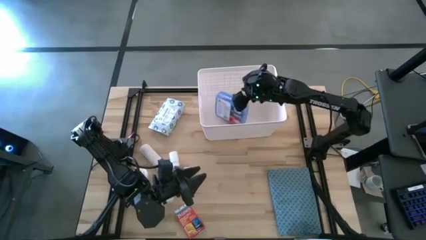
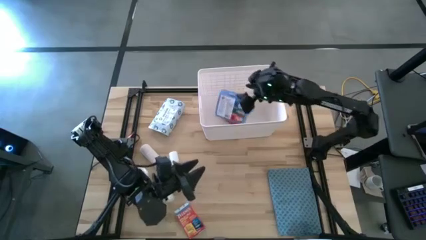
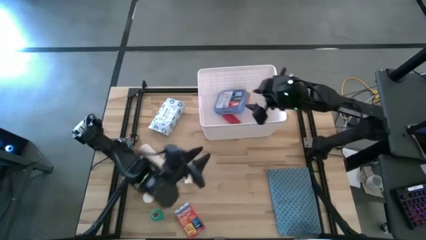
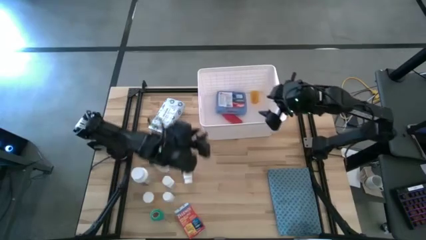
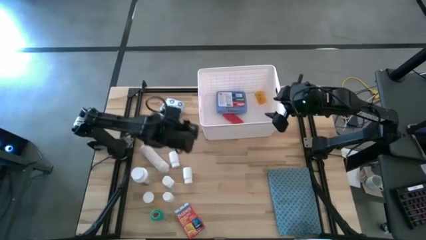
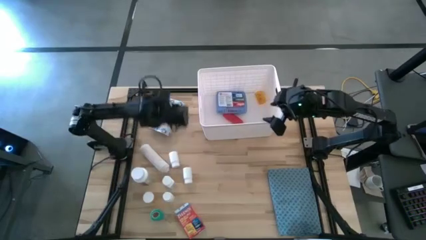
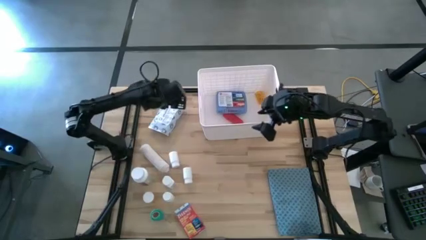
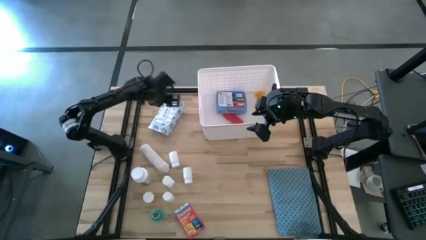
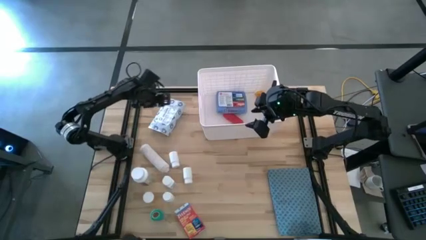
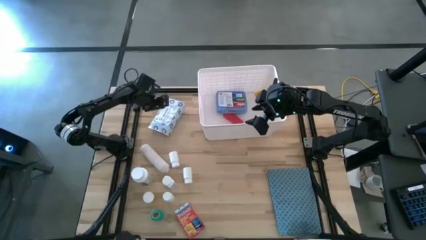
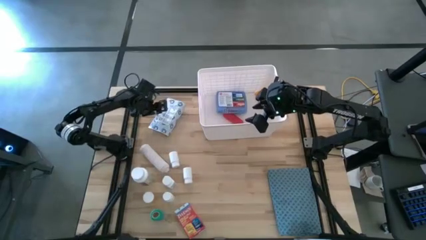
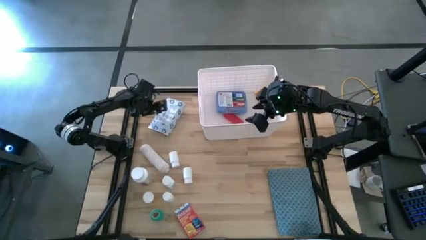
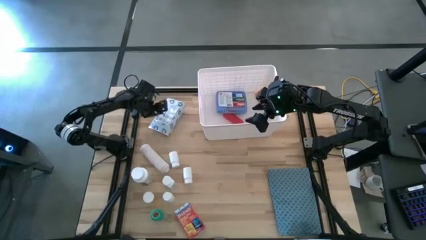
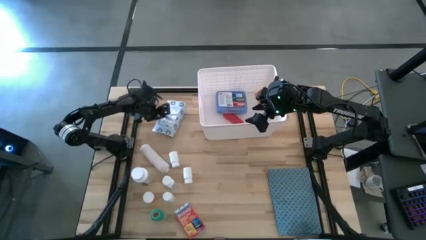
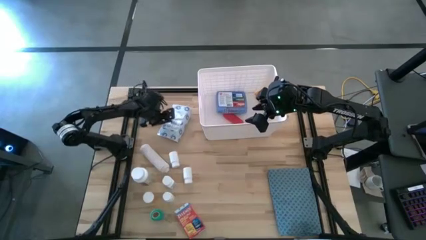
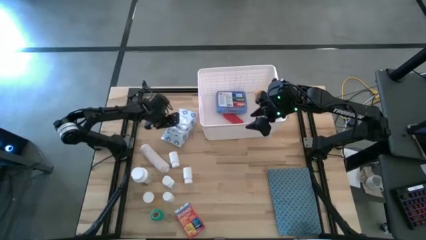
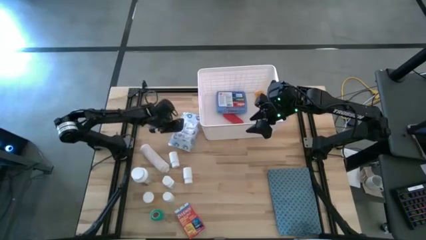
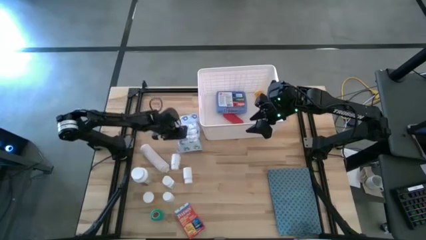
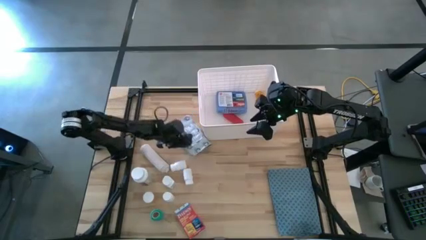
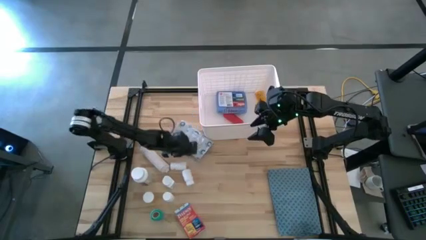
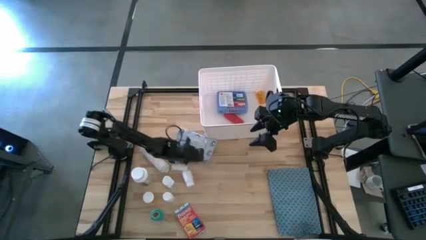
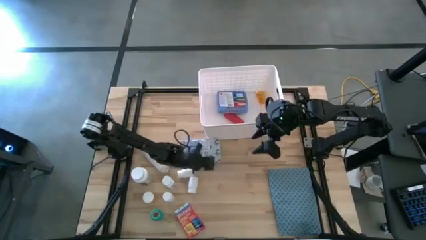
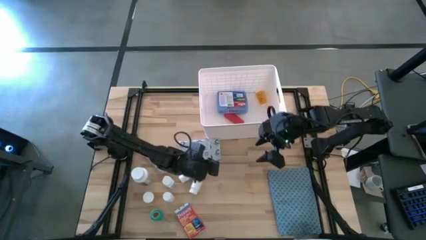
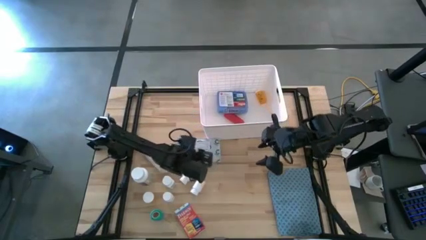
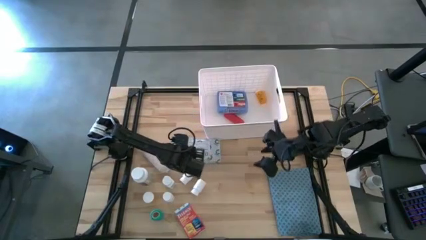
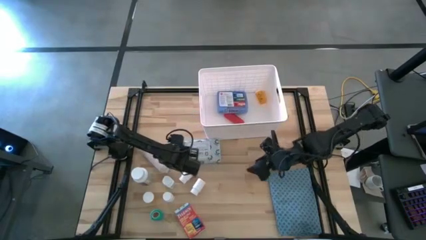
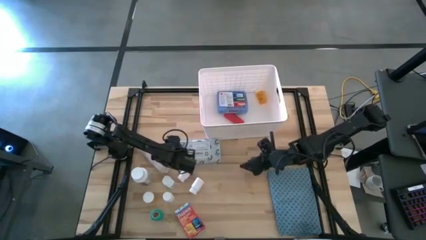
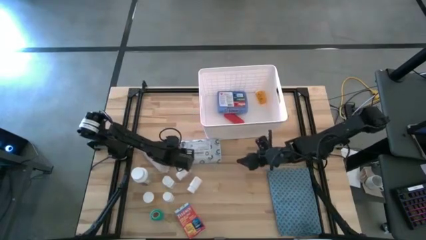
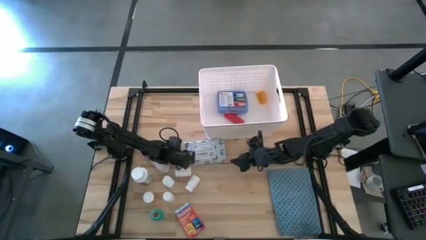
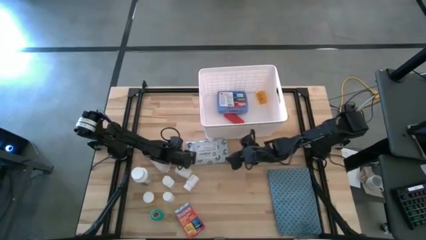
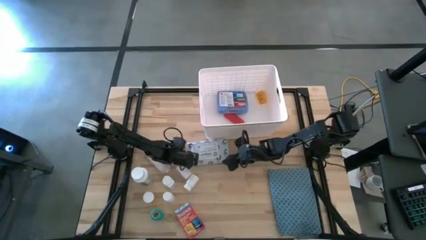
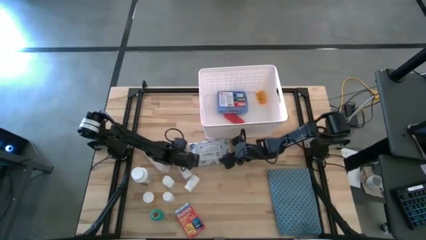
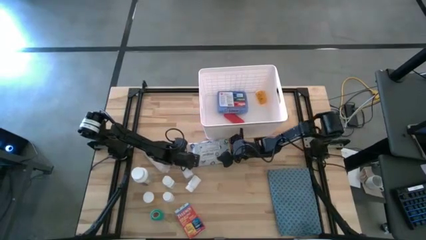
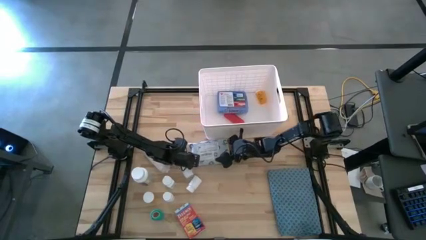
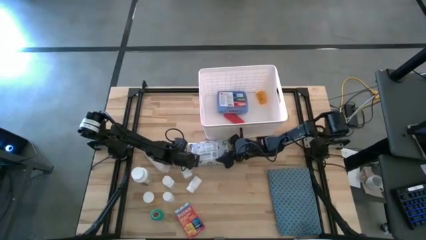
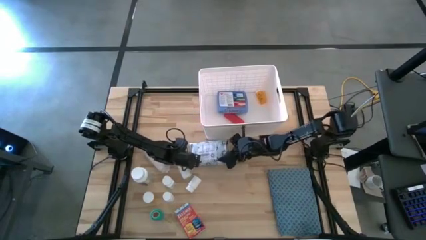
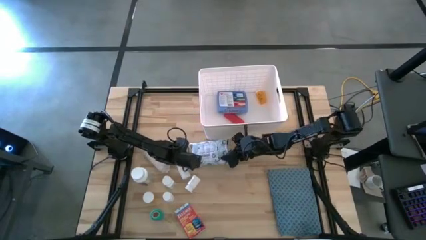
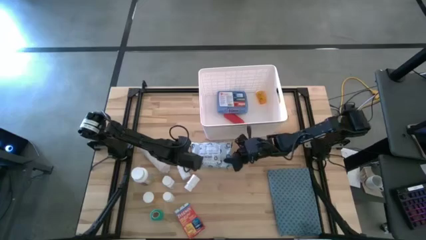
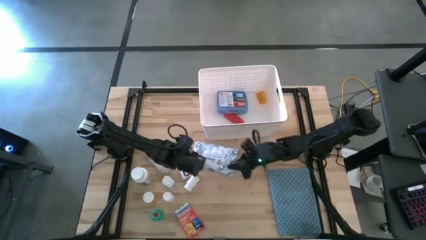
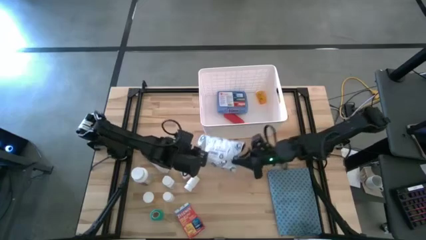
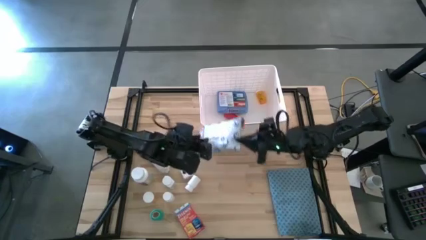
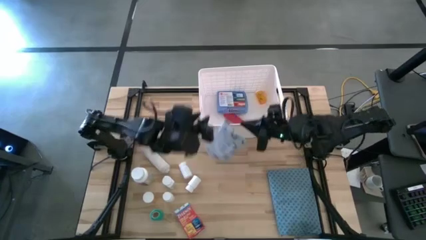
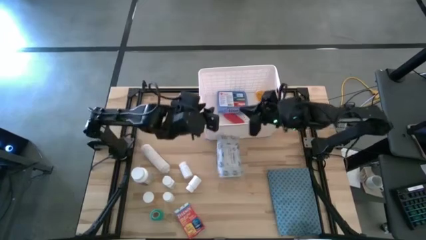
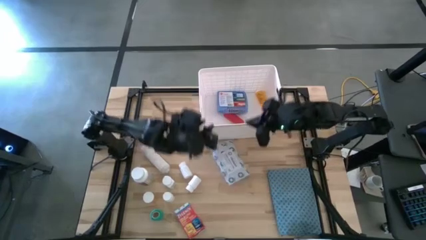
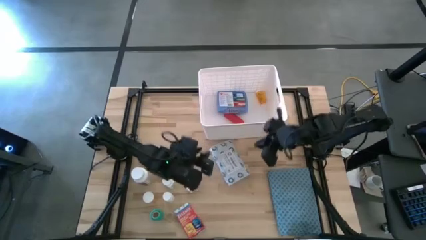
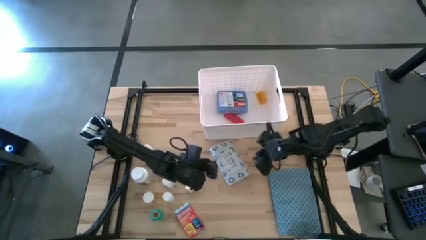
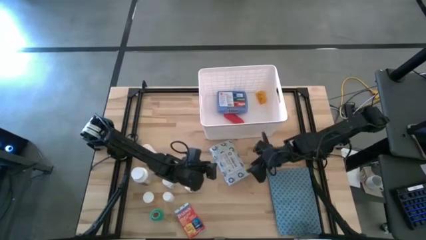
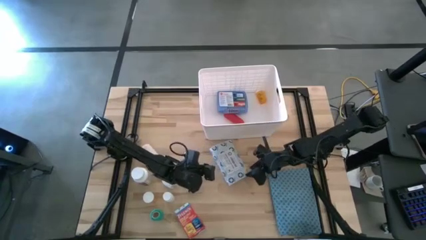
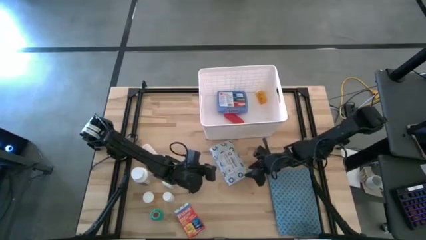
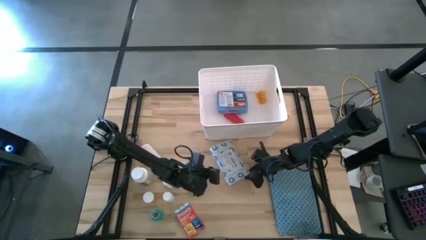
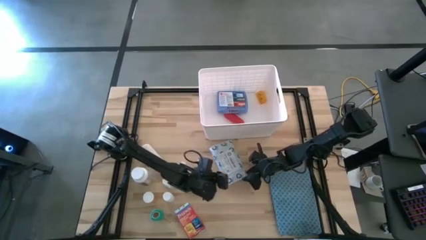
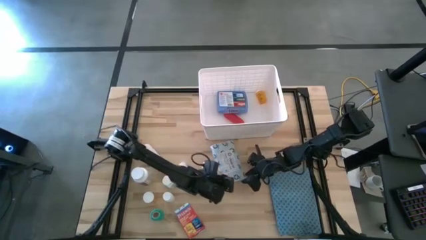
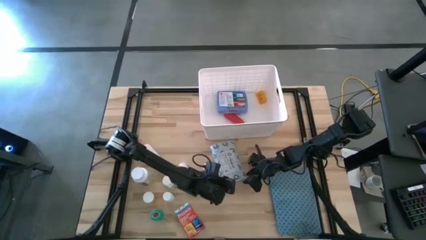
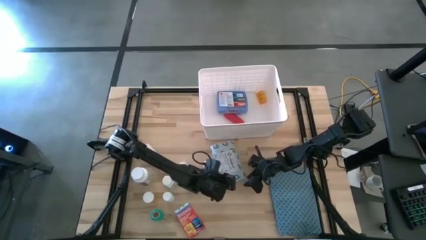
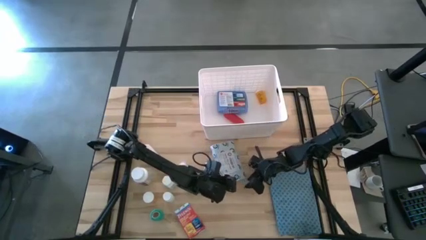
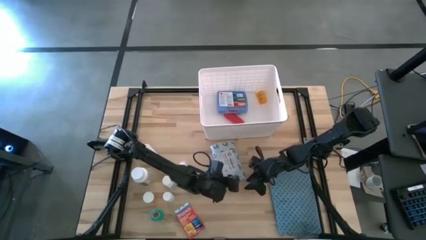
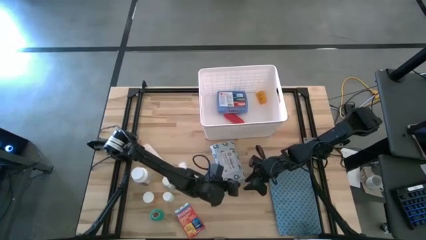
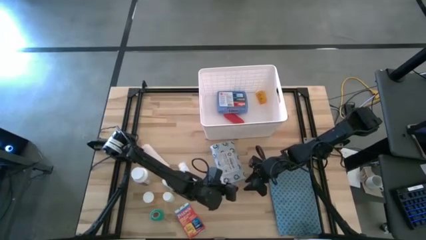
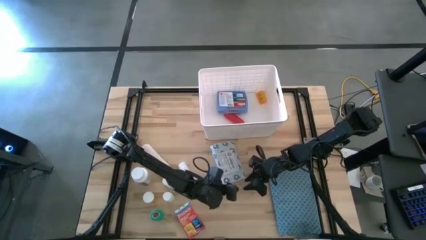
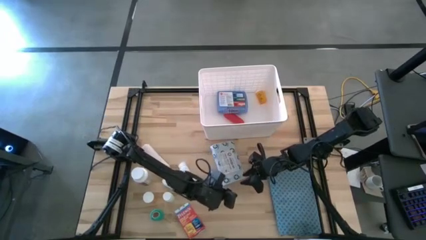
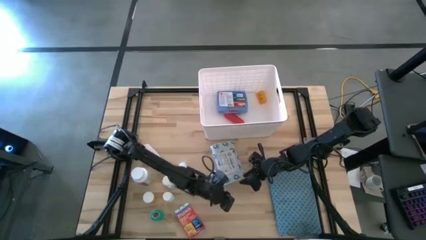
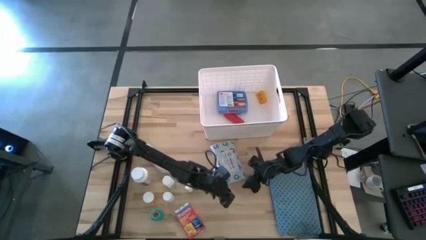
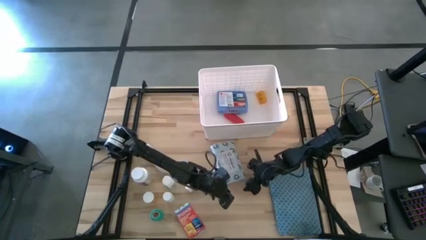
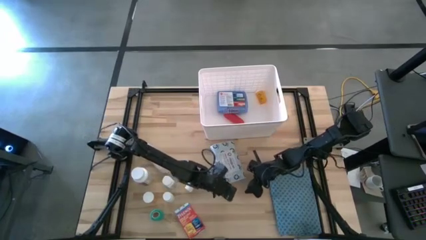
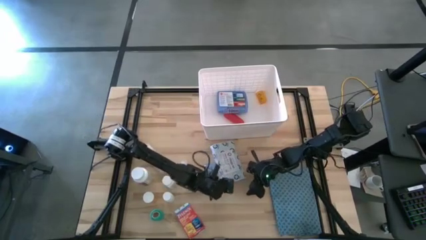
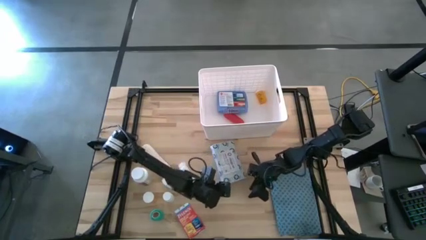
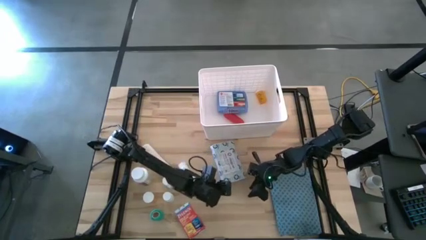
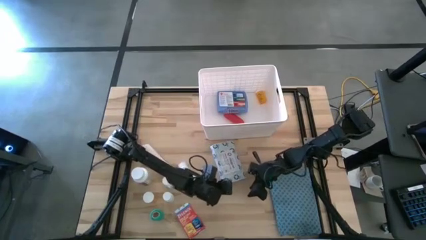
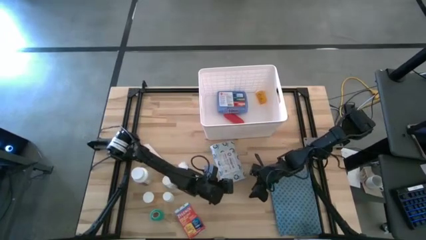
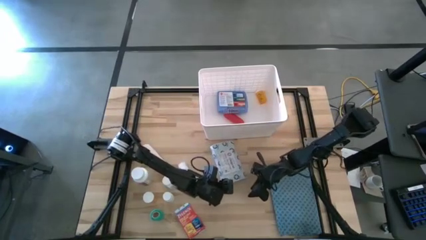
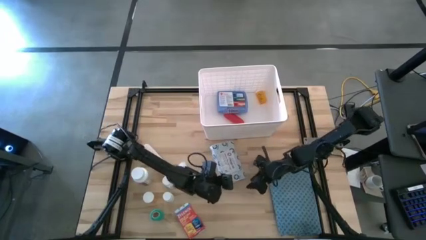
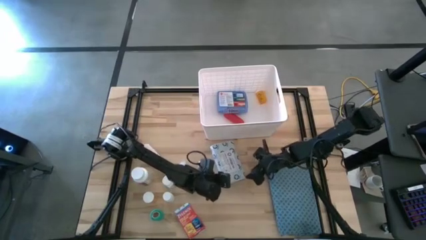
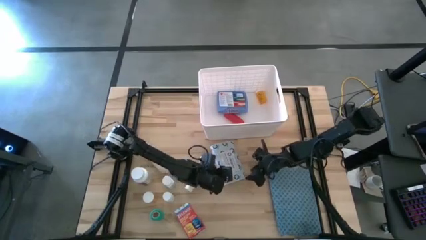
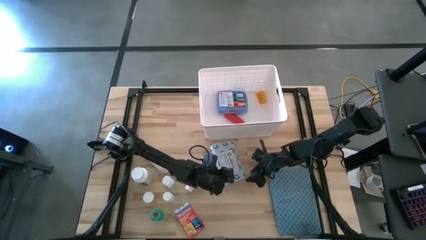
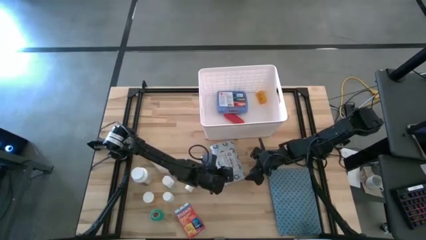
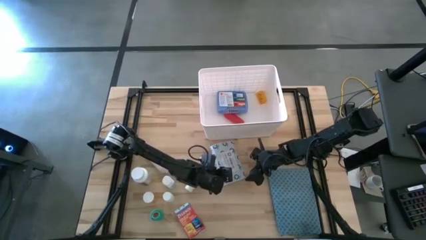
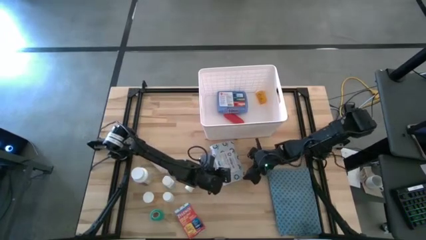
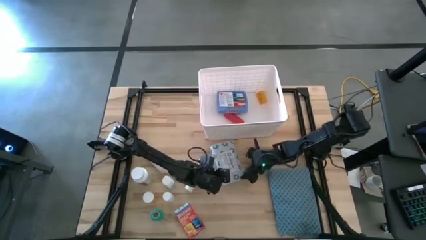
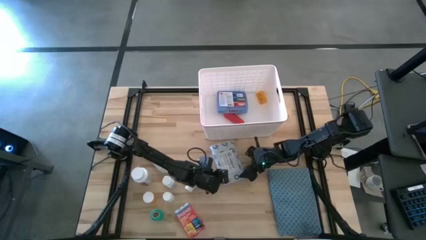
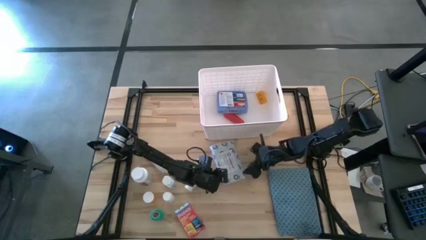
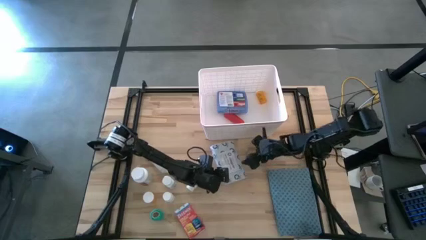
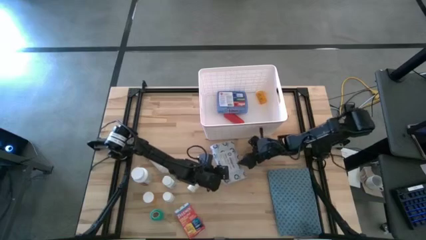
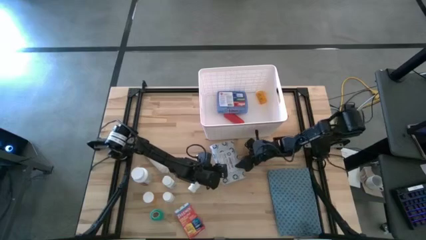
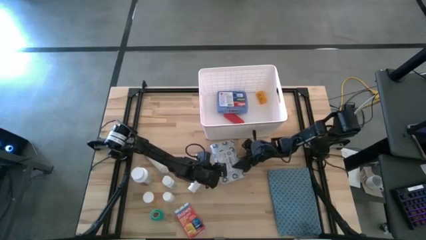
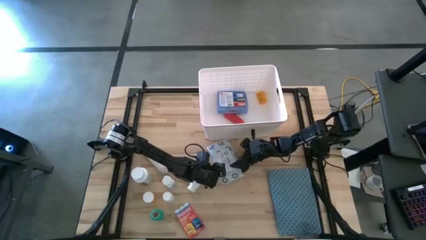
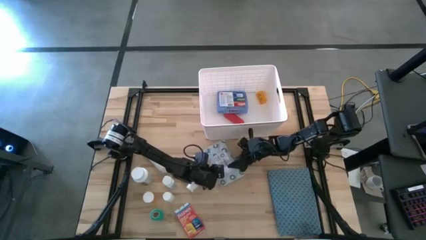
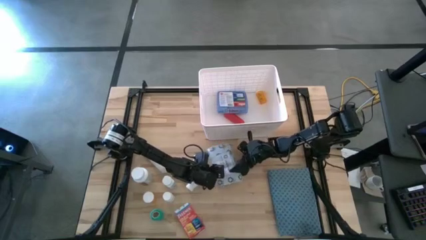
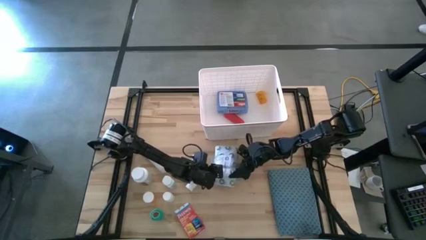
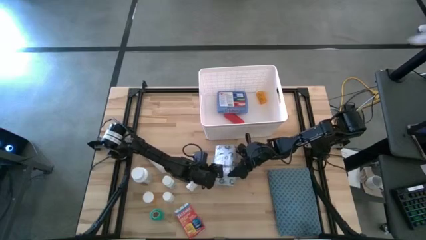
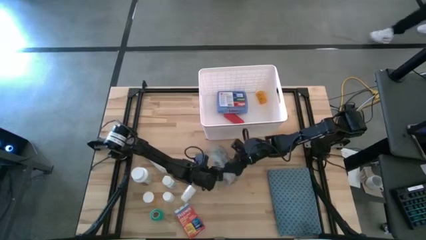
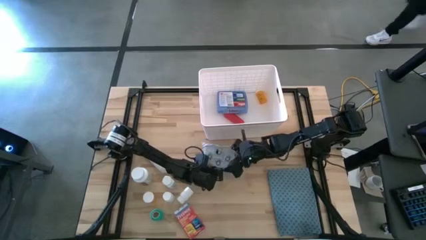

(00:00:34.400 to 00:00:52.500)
Task: Pick & place medical supplies in basket/bin
Put the white mailer bag into the white bin
